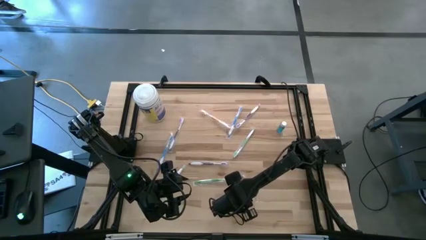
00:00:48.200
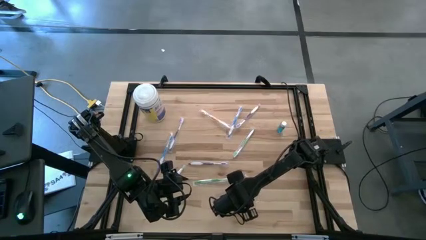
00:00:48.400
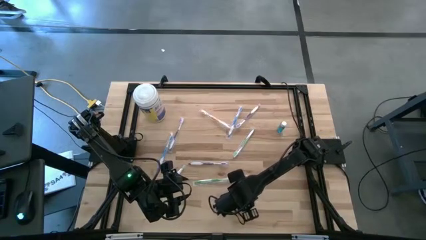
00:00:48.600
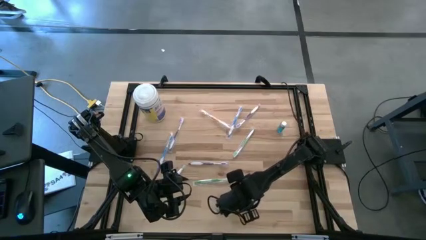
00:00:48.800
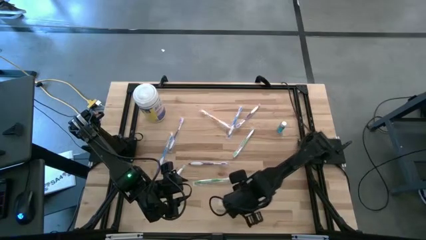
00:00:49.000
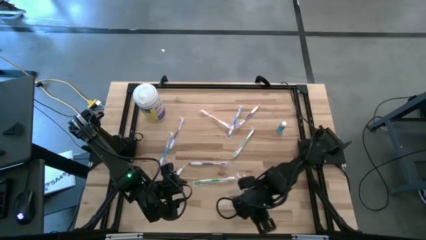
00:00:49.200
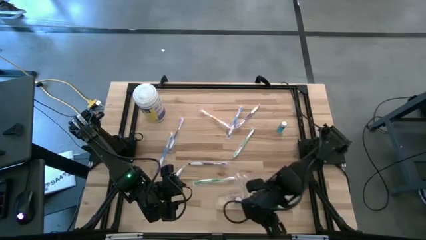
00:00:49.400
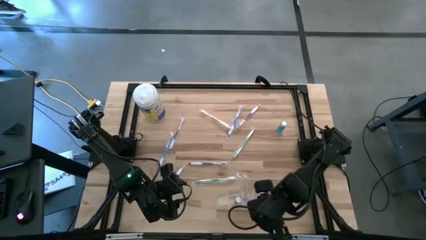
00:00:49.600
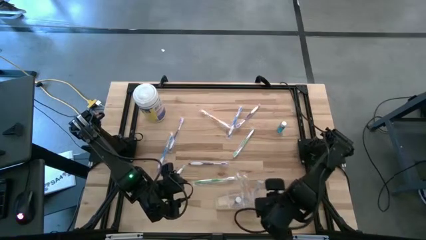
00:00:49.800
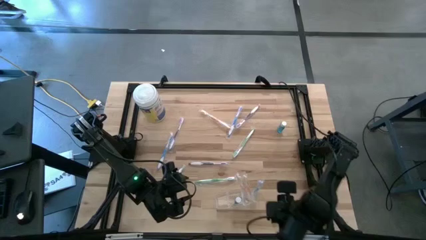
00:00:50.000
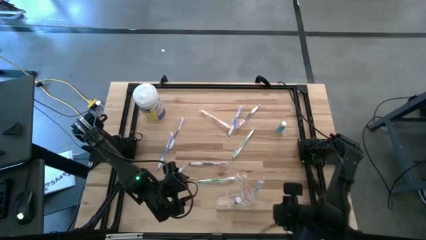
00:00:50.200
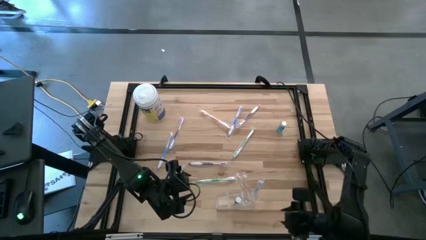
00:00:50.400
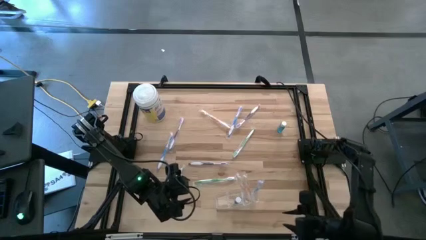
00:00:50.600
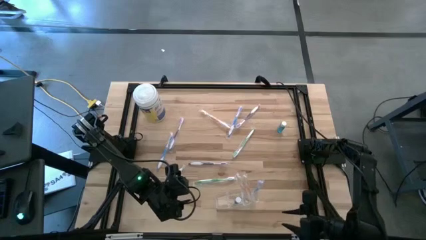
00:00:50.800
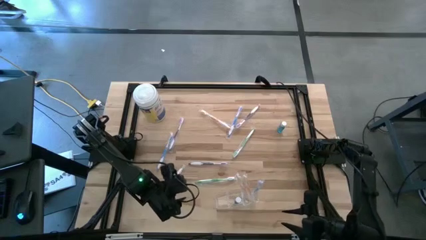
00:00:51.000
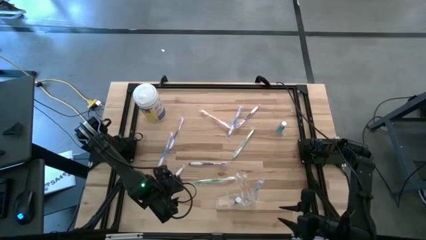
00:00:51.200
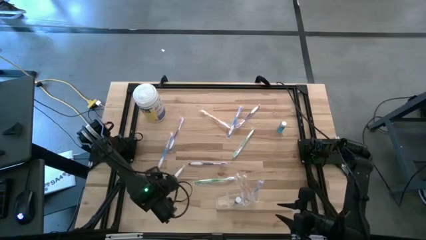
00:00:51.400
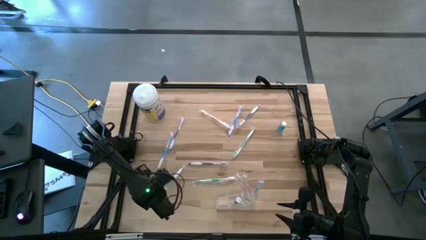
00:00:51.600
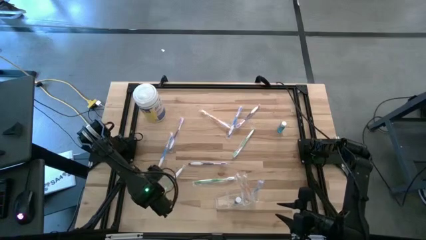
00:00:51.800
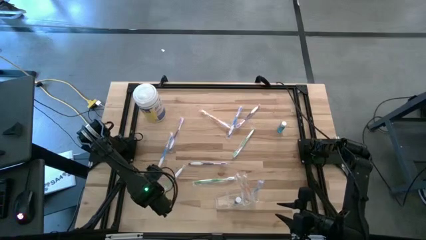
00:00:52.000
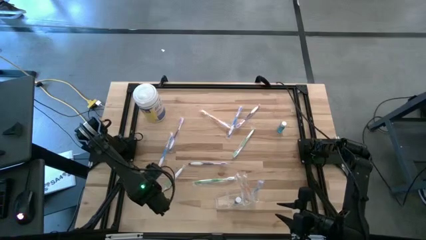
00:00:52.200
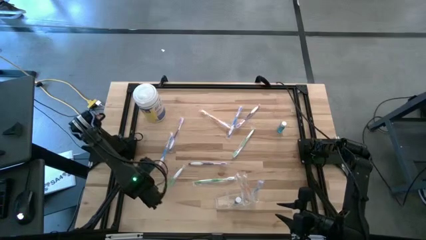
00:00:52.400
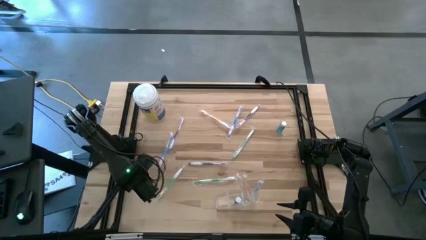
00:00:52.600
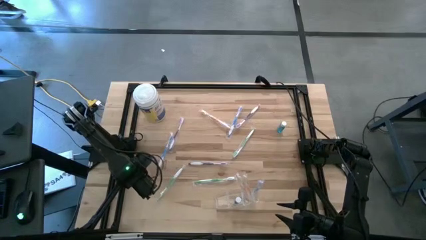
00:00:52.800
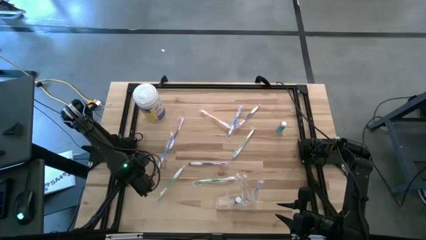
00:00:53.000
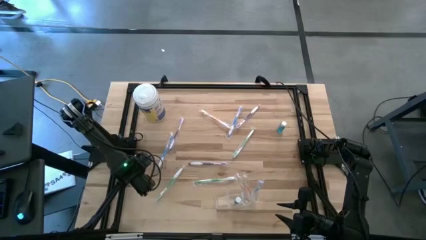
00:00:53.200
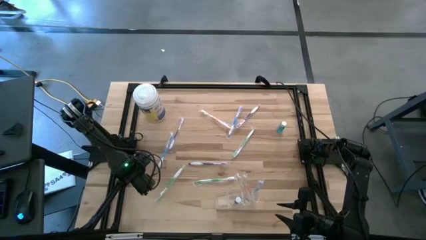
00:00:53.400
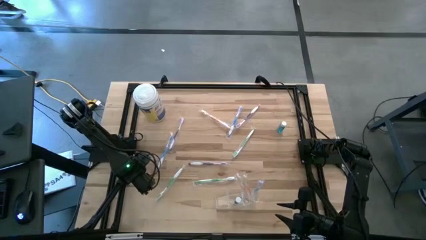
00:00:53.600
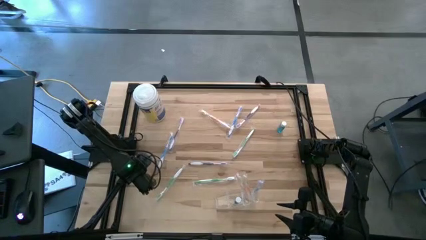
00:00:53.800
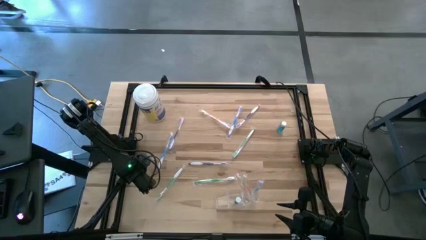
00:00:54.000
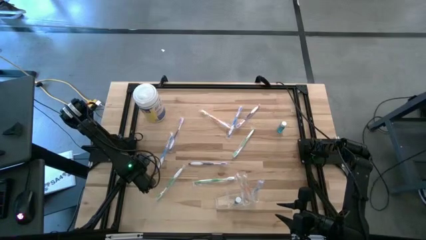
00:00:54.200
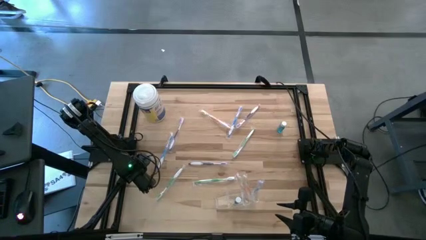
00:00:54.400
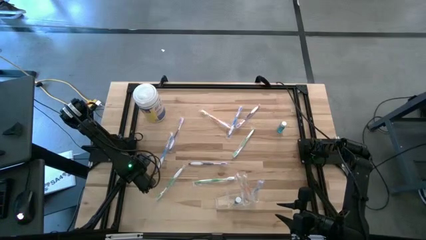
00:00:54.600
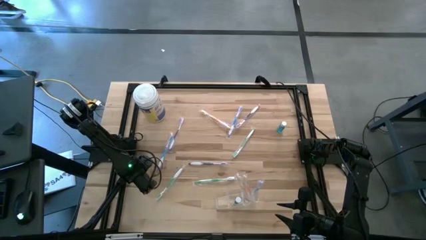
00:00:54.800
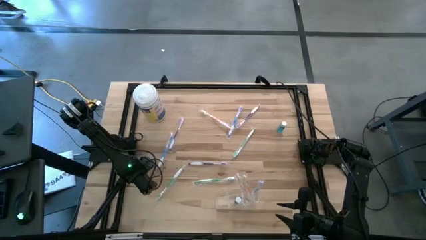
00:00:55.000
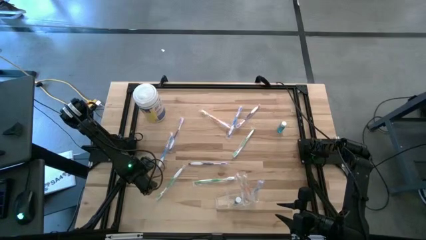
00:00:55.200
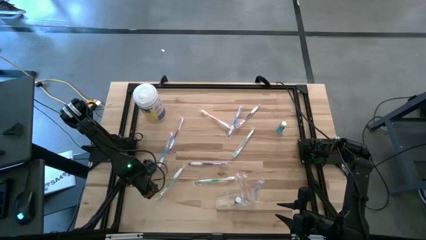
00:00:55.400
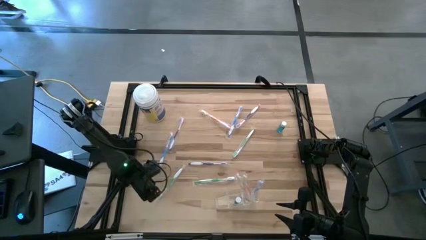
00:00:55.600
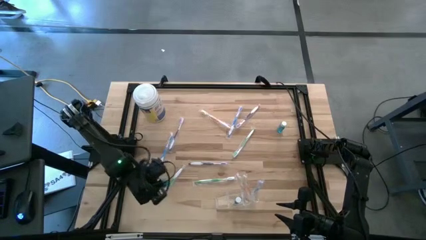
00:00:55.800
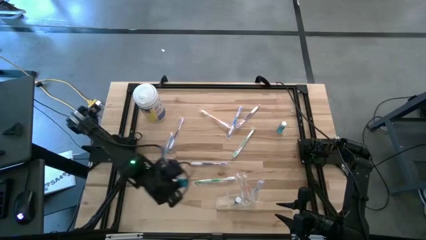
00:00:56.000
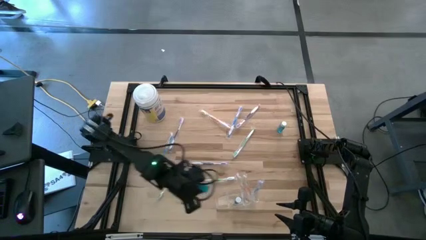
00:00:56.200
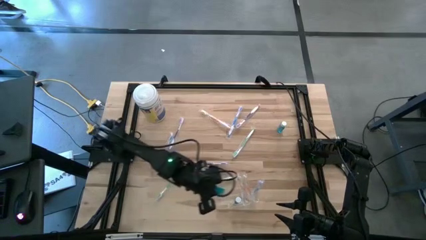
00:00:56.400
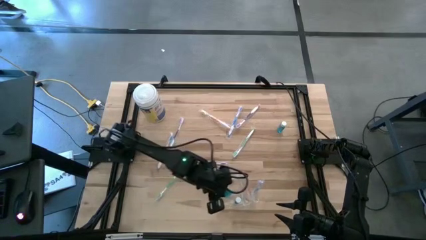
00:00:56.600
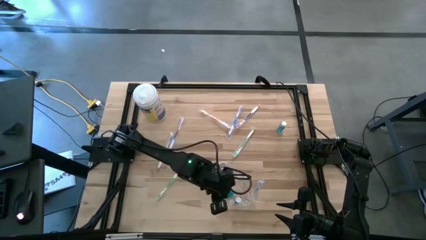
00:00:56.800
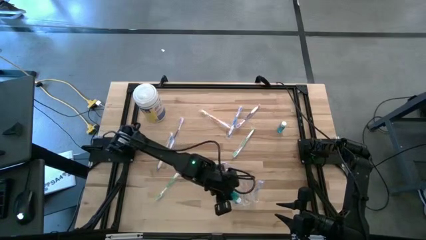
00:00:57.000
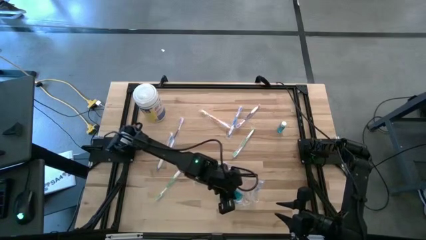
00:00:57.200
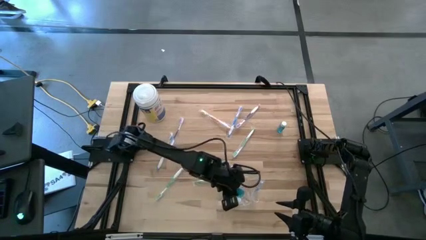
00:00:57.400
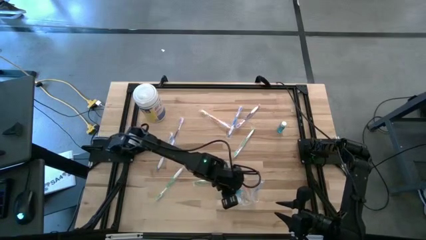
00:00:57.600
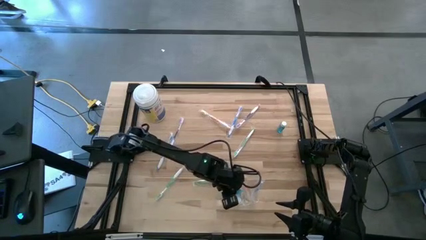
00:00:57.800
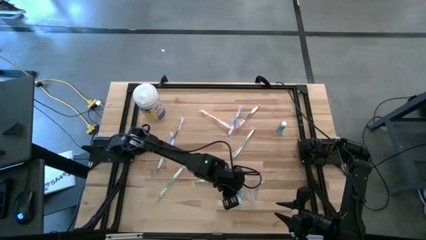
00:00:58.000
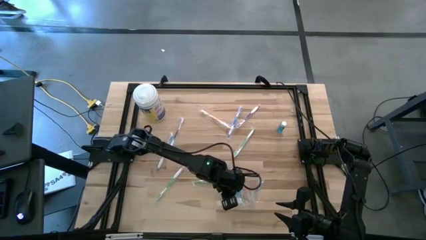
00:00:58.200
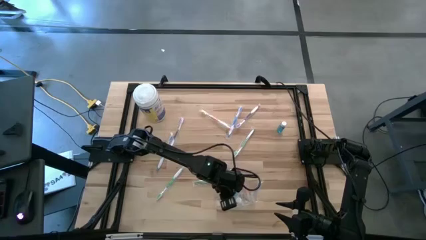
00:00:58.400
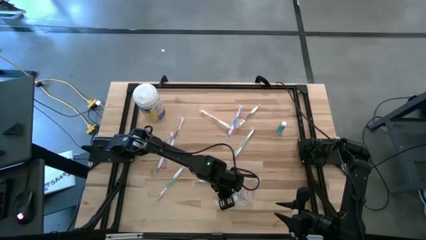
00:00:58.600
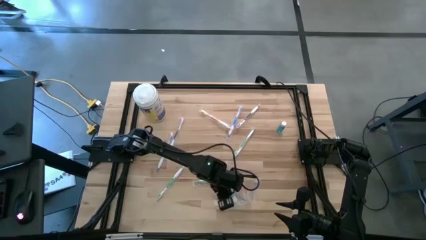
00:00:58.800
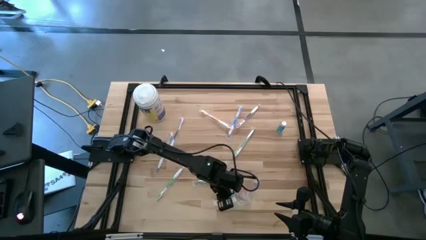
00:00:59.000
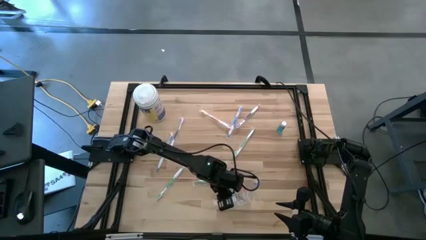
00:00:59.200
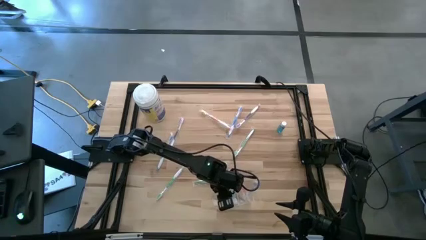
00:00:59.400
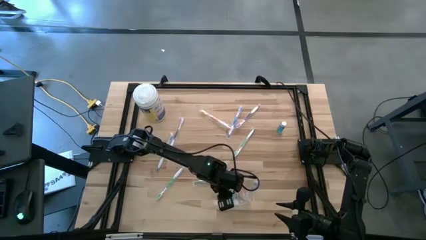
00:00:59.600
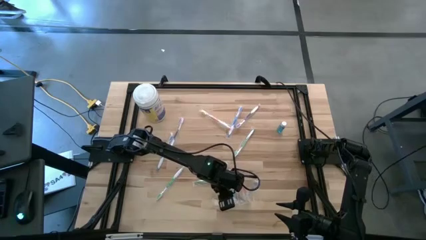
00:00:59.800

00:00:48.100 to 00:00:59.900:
Task: Pick & Place toothbrushing station
Put the left mouthwash into the transparent bin
